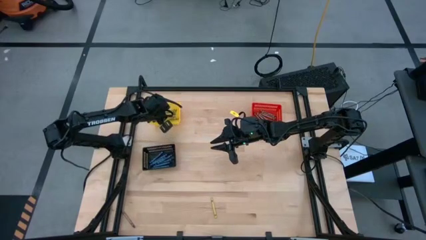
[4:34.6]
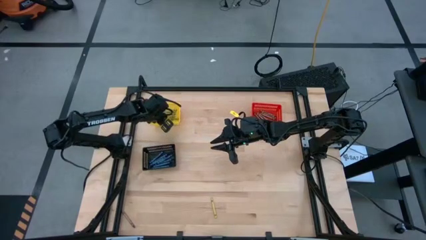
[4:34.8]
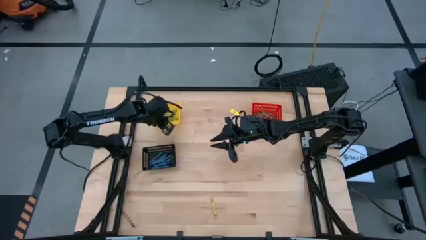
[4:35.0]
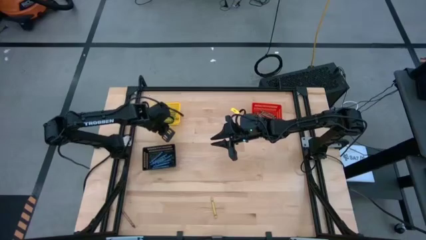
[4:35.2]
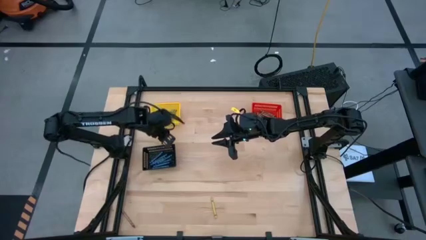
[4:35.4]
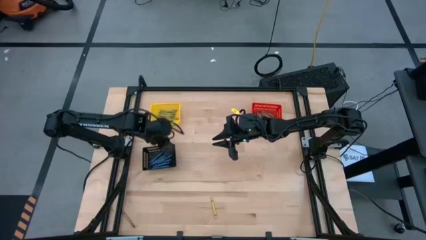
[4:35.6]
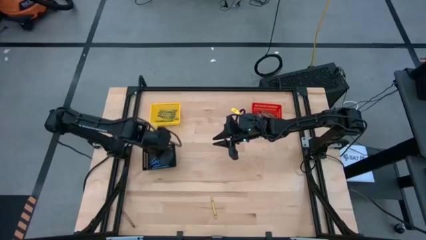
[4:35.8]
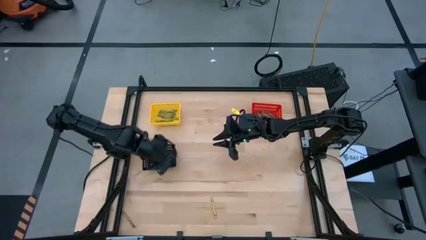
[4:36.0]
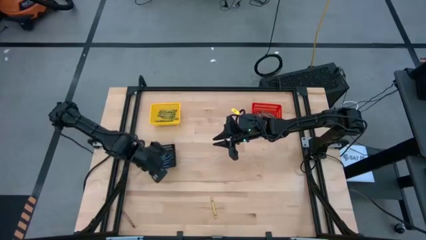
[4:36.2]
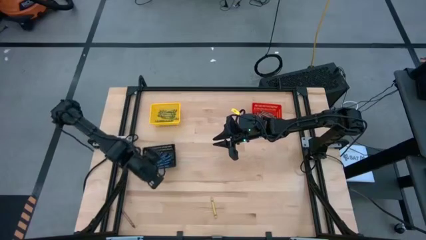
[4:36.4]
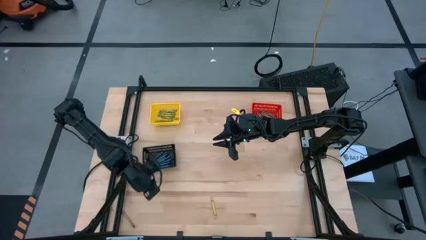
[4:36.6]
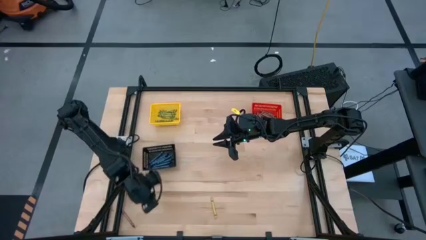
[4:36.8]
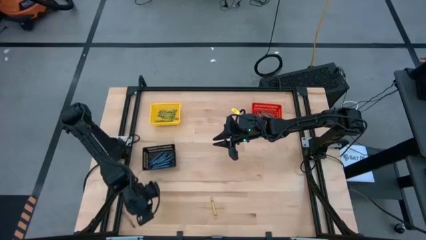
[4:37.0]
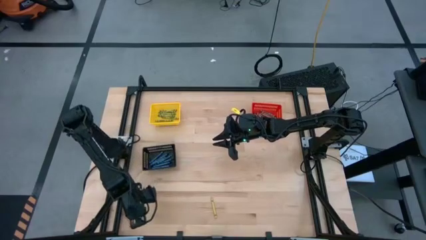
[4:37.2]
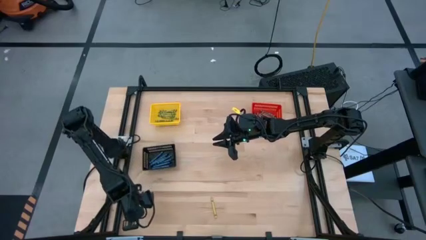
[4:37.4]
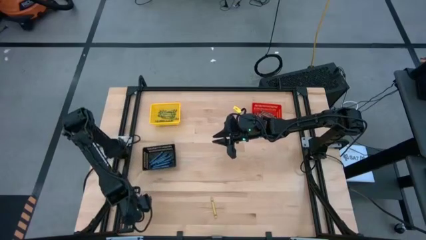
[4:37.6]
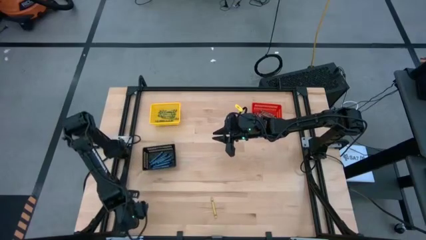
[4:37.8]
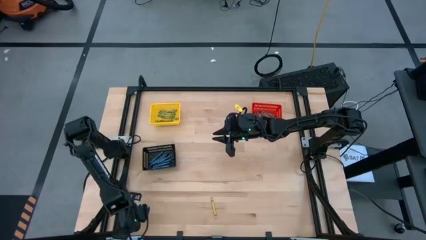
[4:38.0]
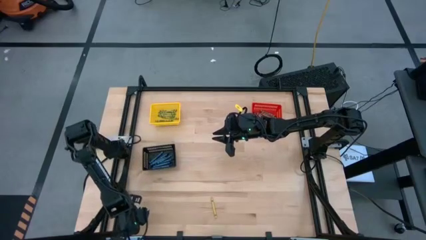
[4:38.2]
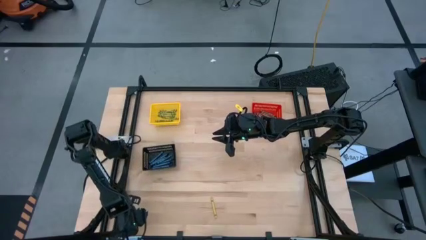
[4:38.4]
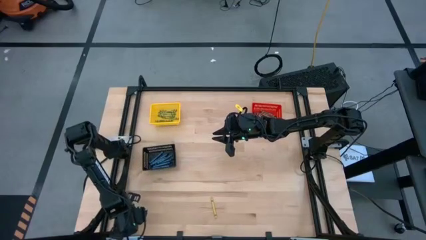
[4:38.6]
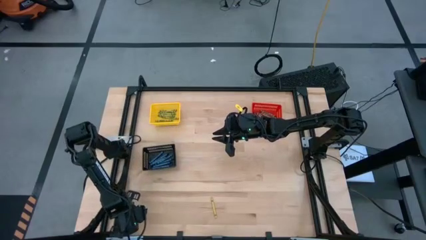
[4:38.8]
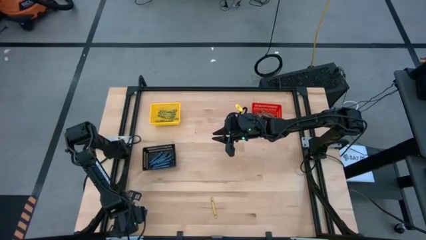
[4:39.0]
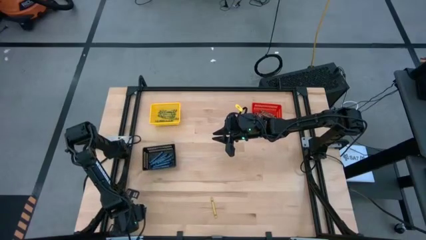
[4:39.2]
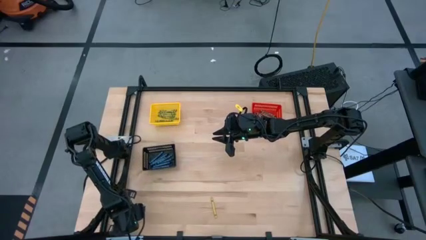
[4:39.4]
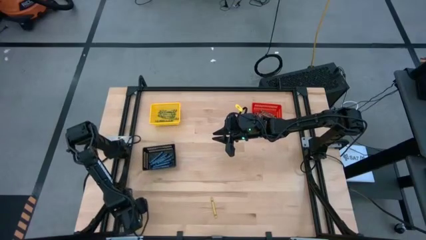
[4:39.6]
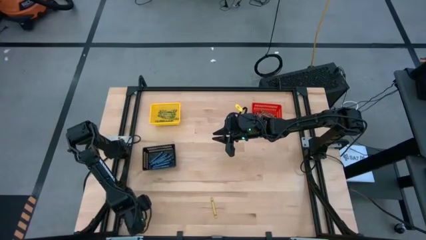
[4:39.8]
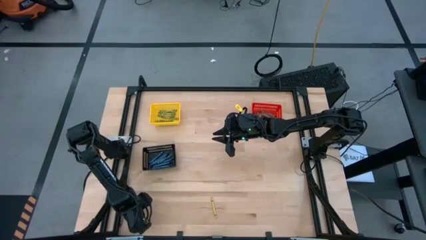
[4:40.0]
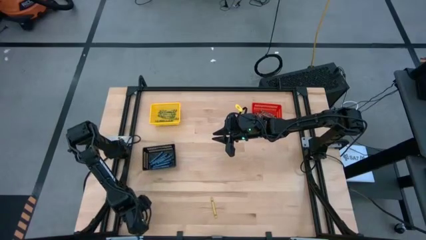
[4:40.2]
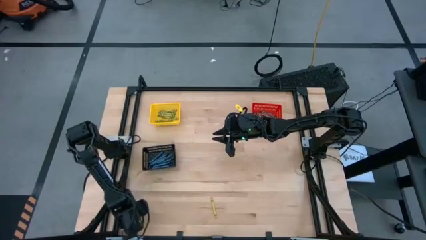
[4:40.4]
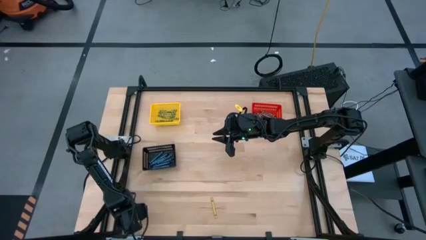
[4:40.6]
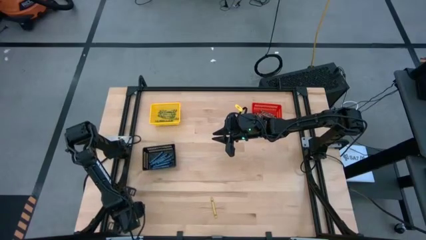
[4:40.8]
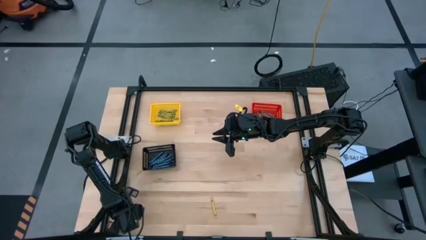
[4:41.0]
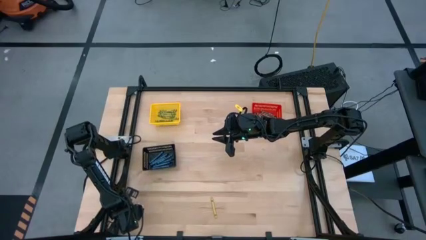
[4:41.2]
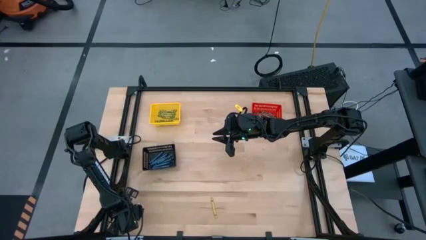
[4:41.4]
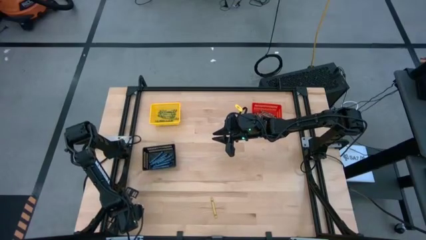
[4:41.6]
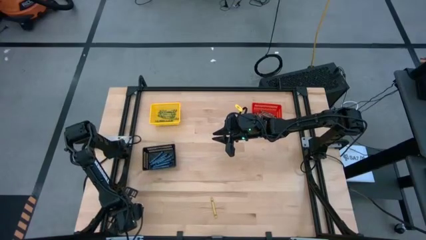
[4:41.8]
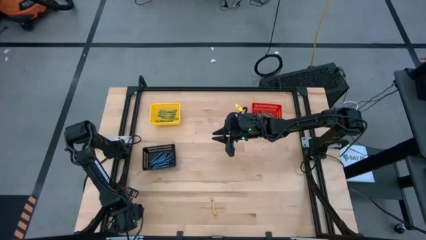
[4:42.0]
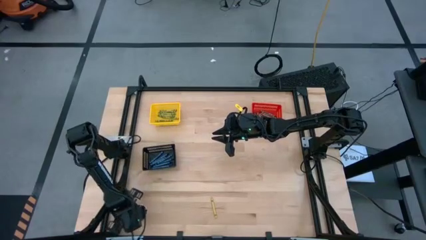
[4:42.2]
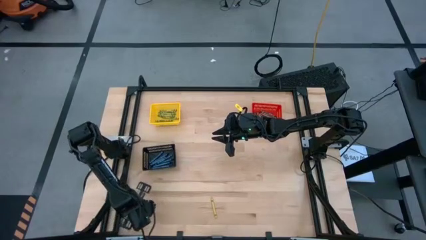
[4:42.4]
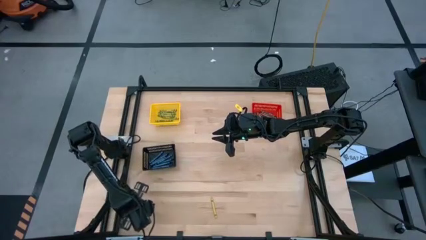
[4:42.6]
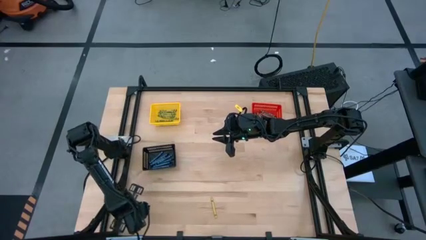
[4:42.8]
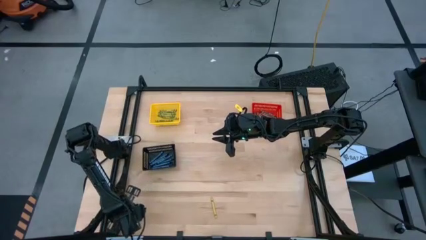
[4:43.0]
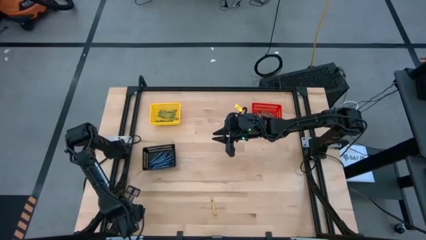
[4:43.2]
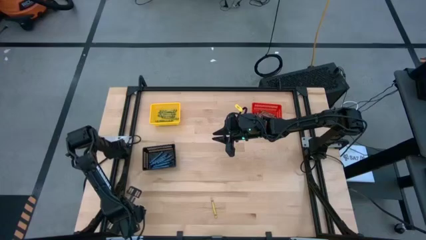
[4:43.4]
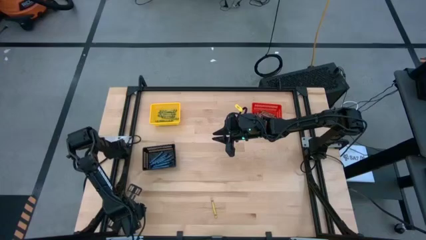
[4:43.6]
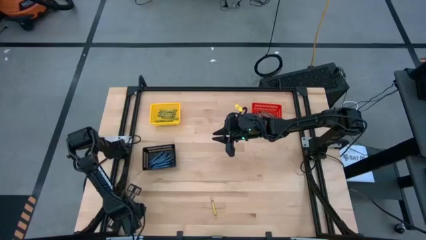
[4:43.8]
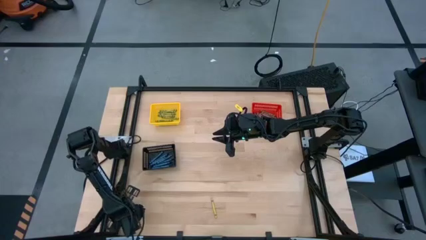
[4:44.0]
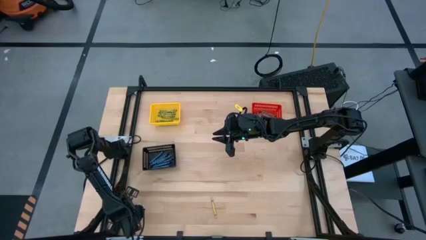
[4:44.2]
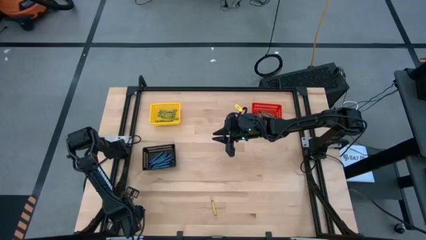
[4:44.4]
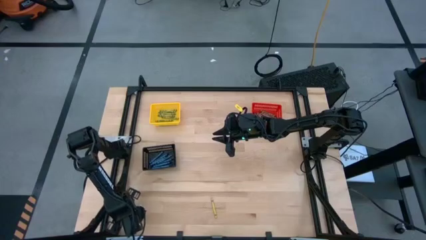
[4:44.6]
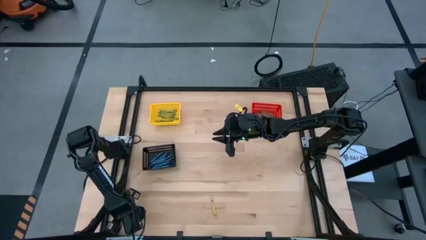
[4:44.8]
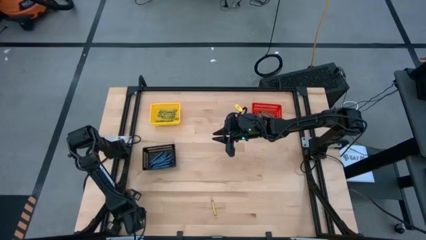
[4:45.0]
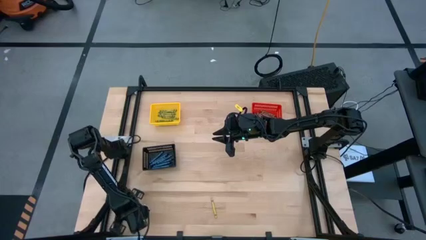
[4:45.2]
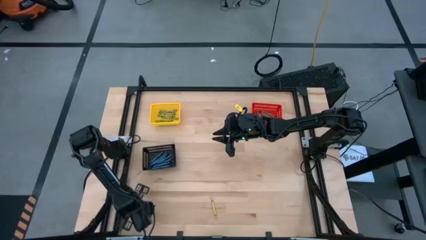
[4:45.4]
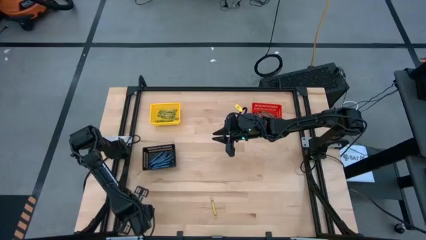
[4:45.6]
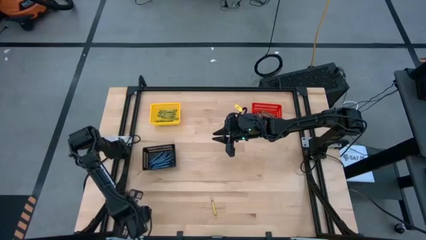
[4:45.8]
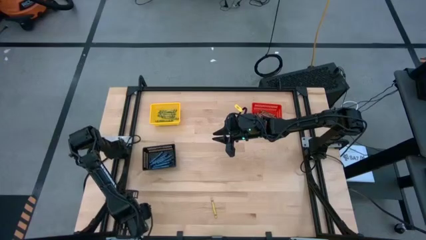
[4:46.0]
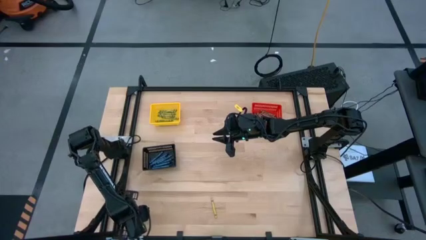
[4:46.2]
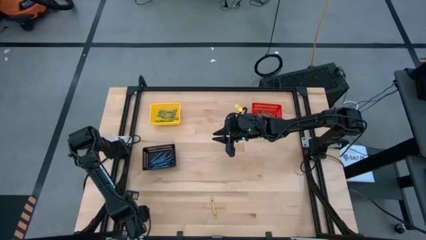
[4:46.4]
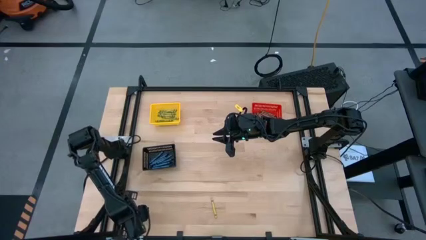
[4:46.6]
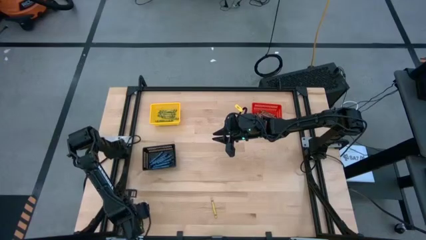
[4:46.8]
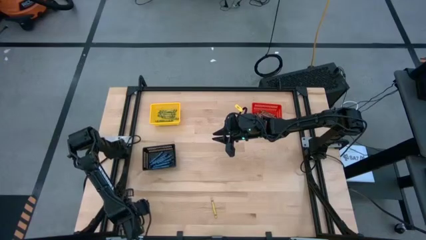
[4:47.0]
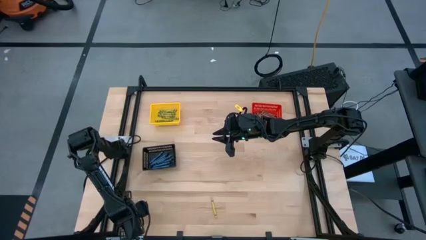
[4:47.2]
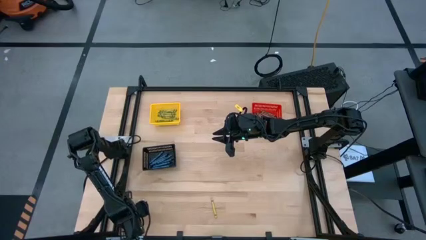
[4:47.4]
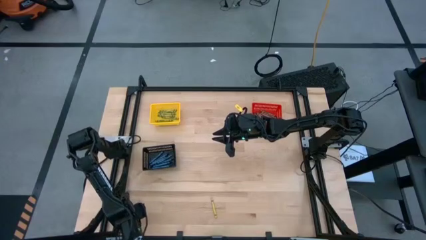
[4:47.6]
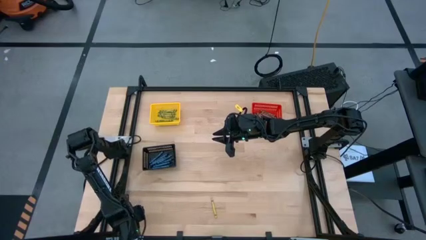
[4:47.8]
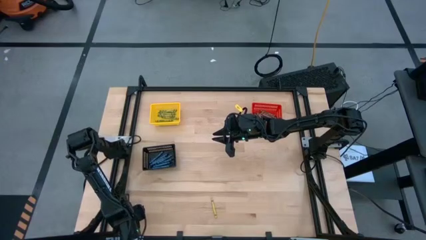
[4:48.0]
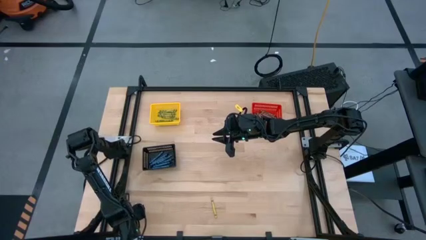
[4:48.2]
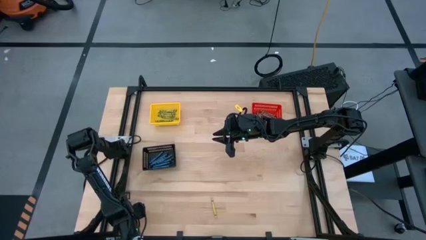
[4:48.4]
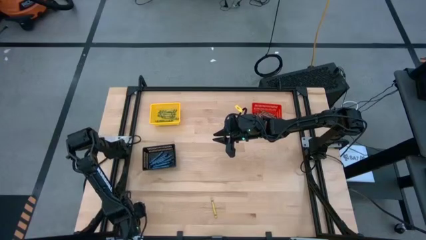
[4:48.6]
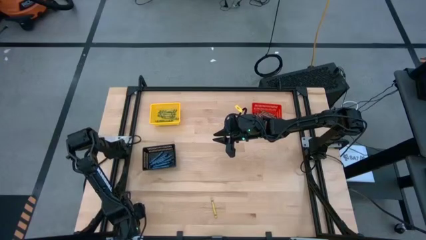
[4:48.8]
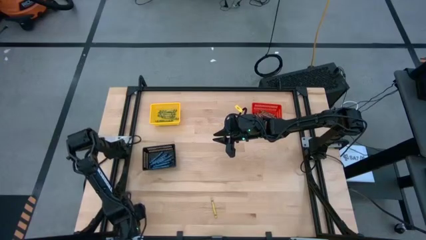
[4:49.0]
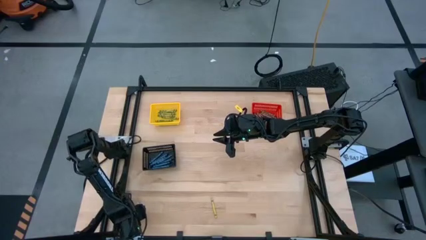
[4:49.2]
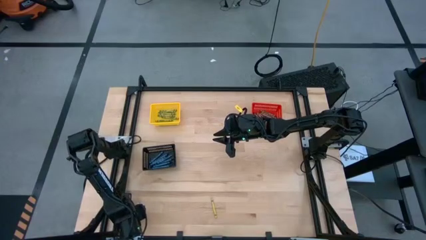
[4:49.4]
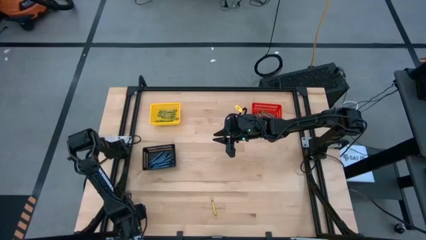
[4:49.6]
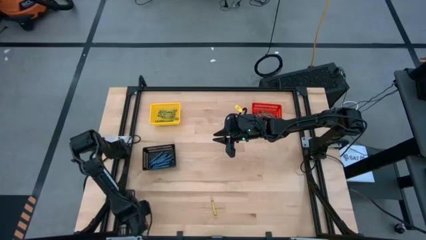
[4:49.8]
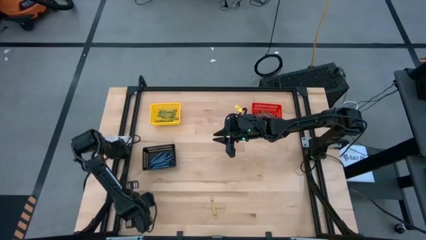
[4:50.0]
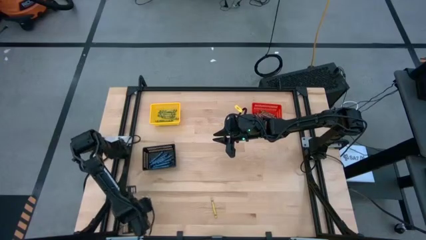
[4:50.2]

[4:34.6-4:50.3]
Task: Sort crayons
Put the brown crayon into the red bin
